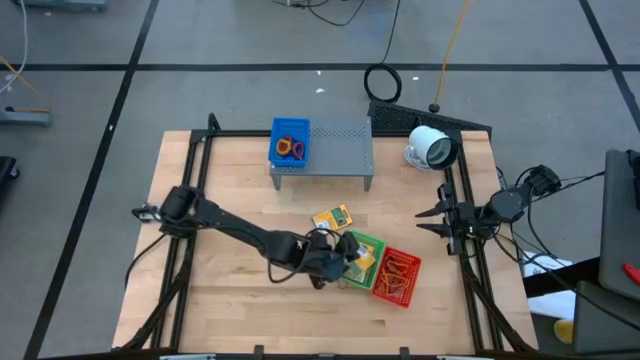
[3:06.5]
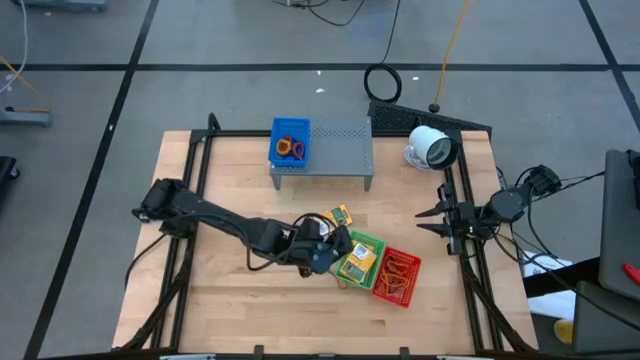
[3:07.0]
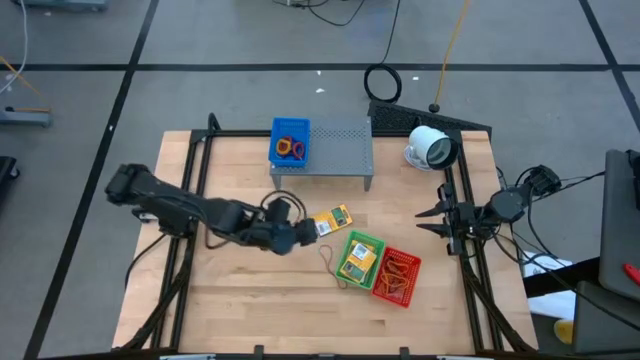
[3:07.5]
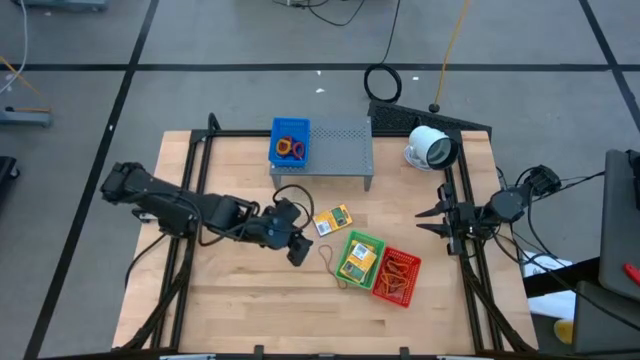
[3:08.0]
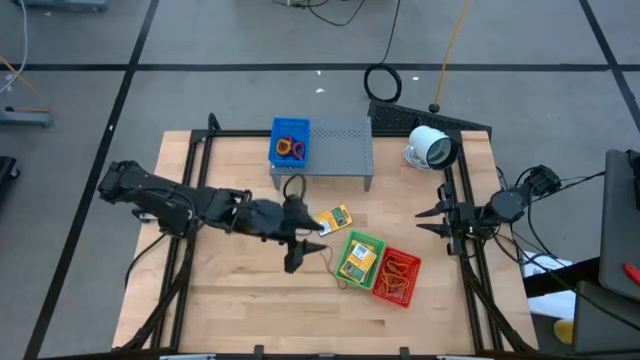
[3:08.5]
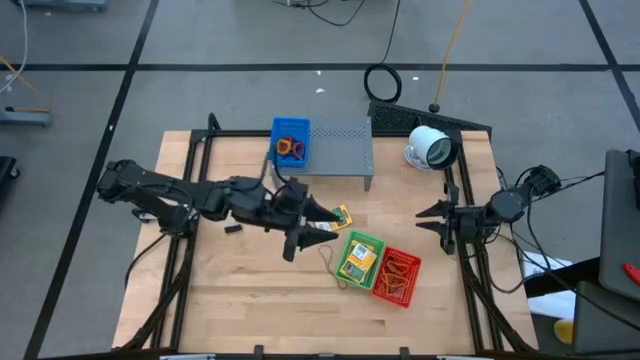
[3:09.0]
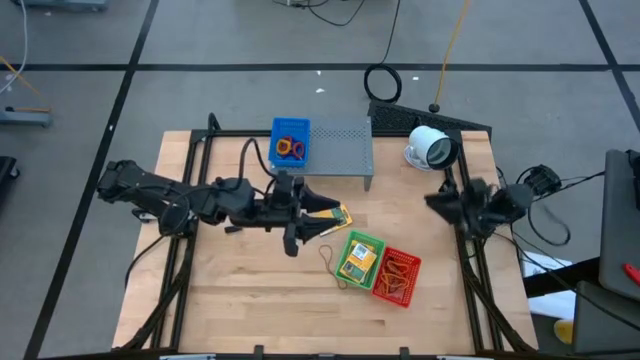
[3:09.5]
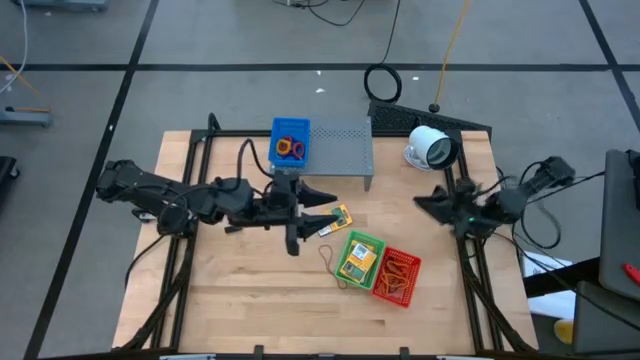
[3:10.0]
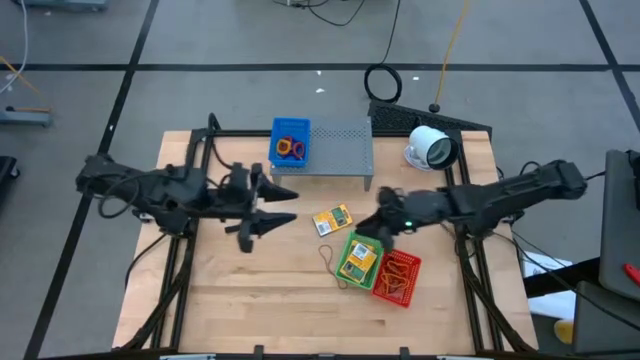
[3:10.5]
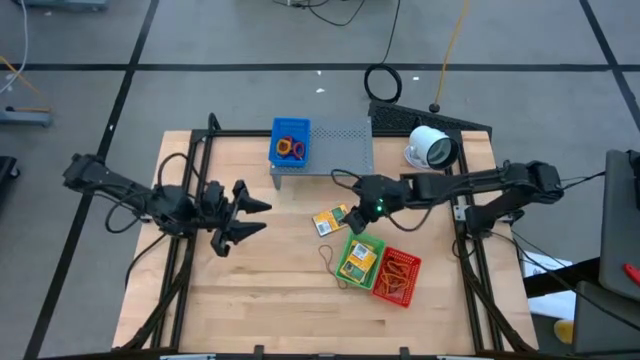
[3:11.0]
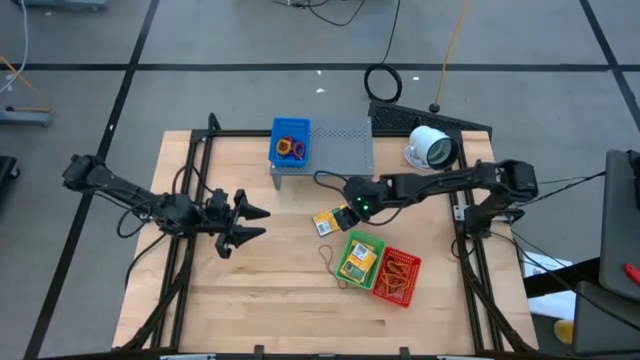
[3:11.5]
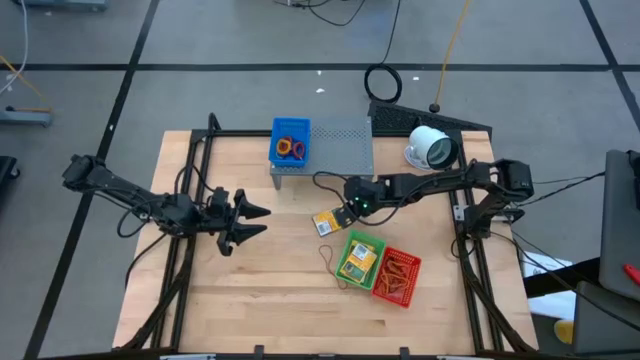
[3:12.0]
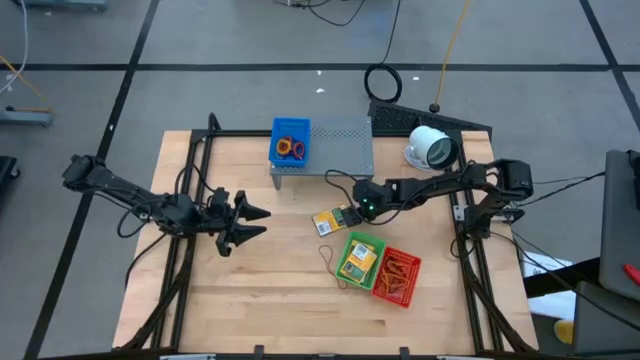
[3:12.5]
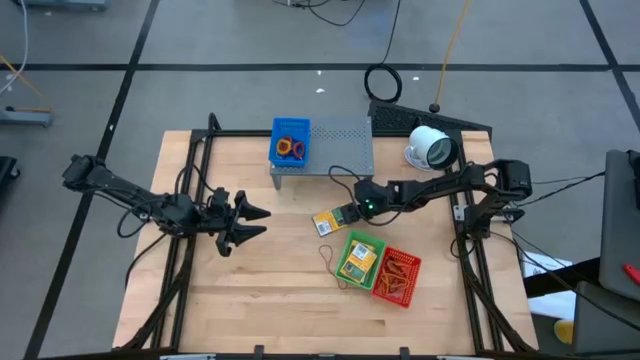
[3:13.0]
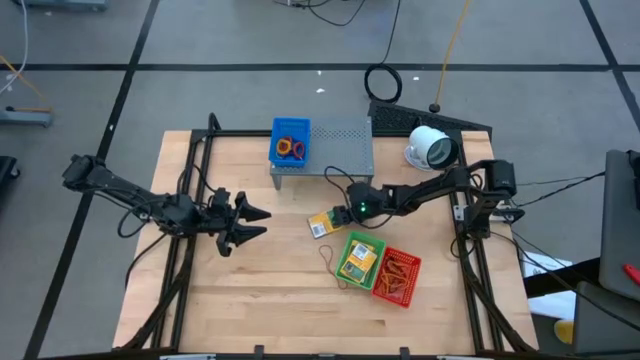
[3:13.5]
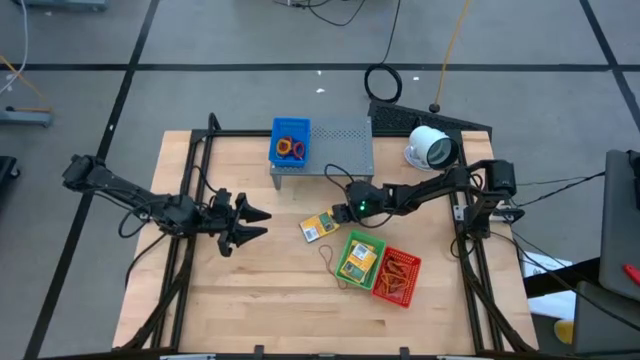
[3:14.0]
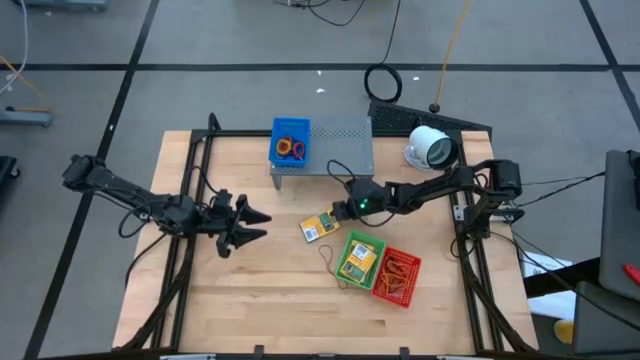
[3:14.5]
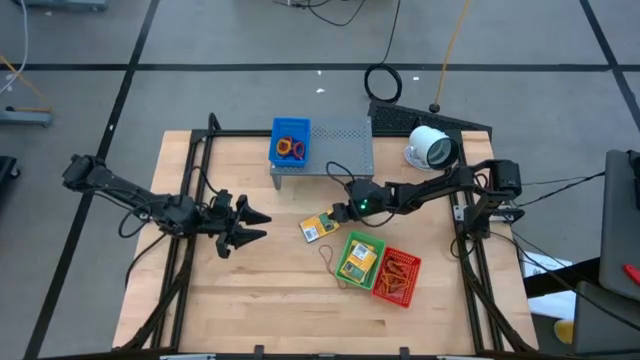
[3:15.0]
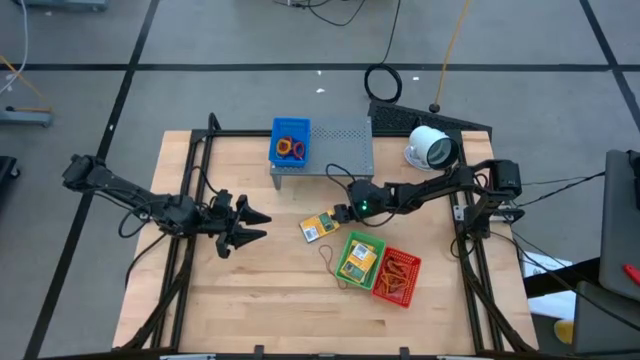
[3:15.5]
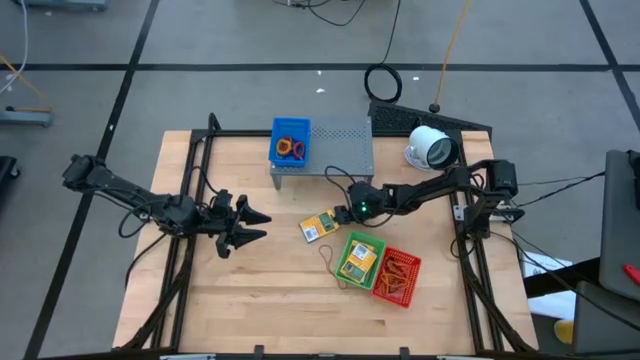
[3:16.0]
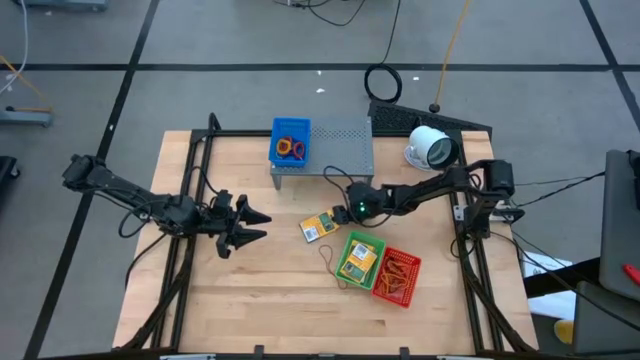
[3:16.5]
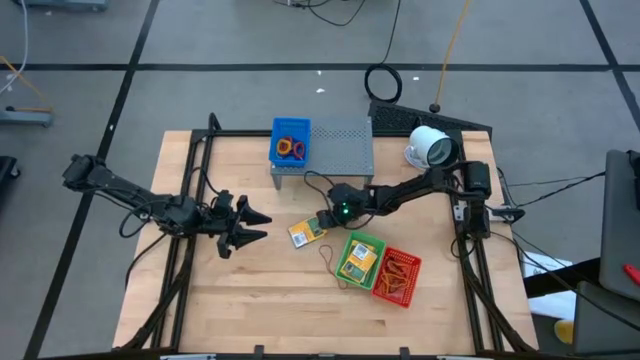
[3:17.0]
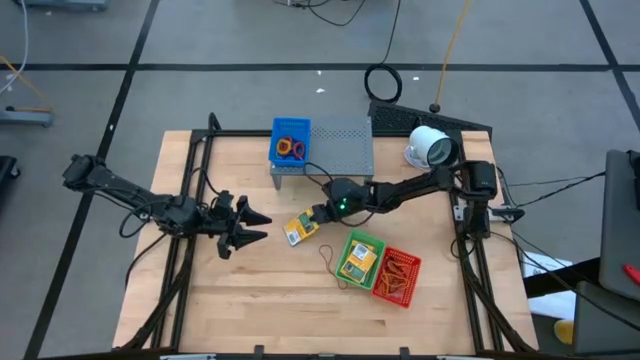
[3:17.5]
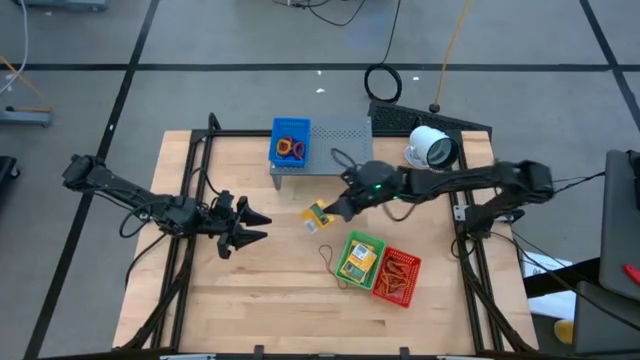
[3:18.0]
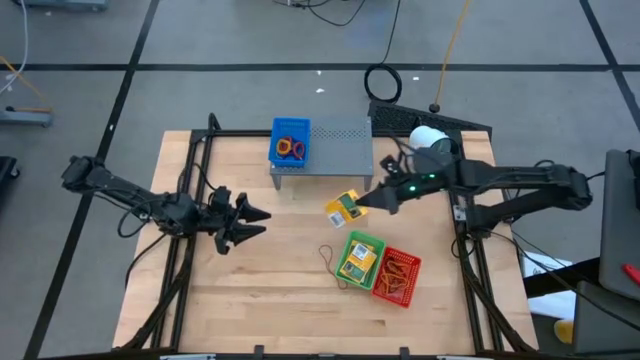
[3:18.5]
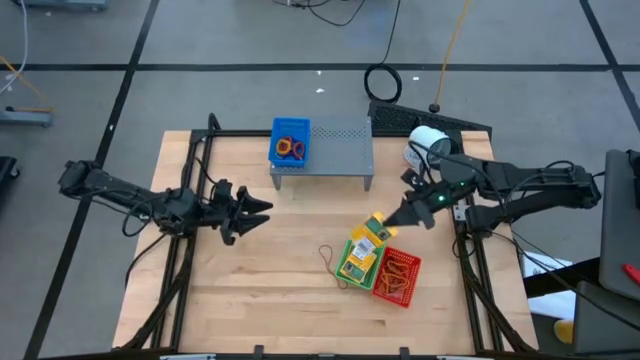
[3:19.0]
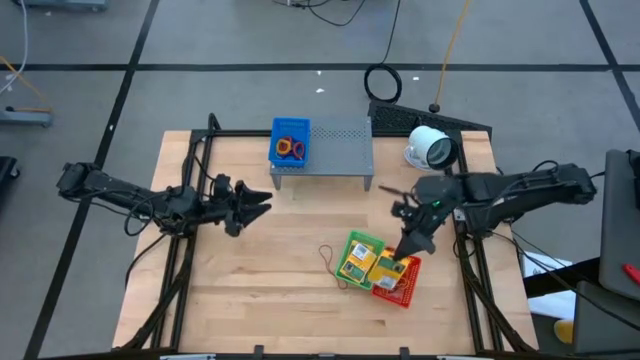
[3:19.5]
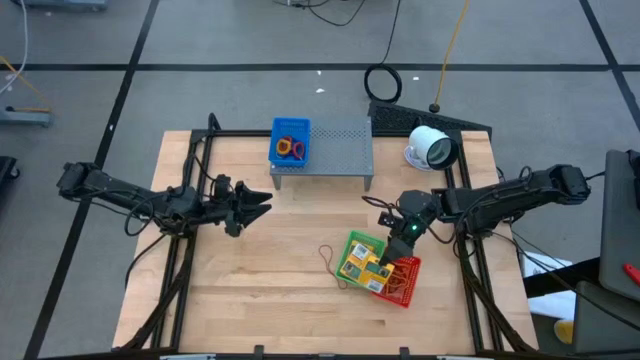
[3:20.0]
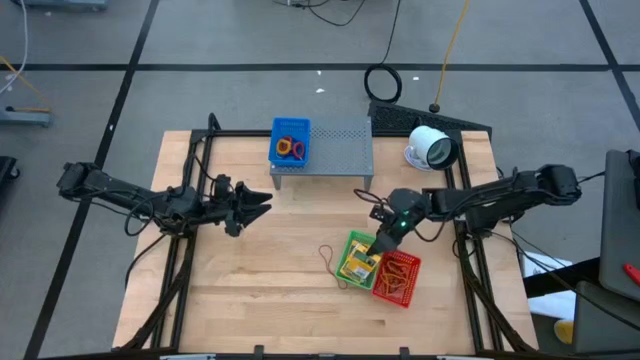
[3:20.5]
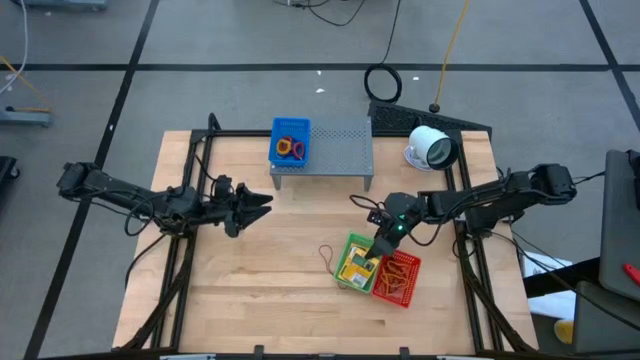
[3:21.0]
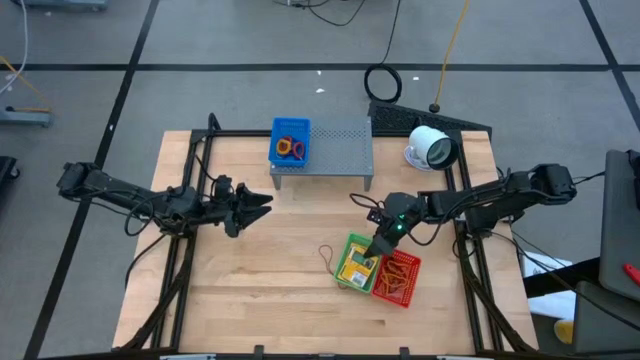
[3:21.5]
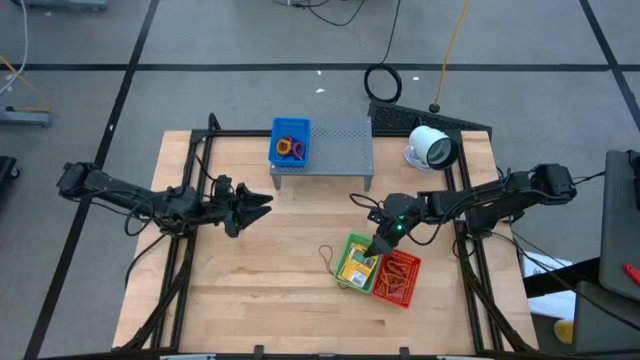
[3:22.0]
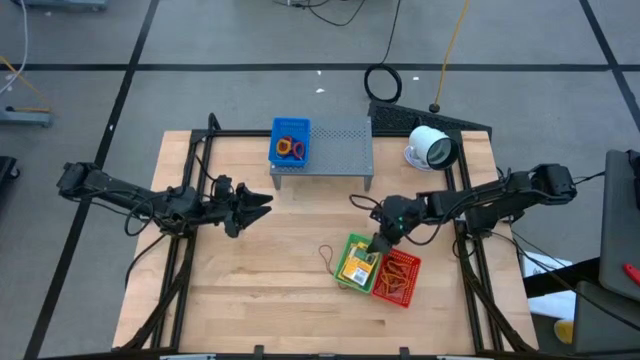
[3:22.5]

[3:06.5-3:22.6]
Task: Pick & Place Office Desk Supplies
Put the crayon box into the green bin

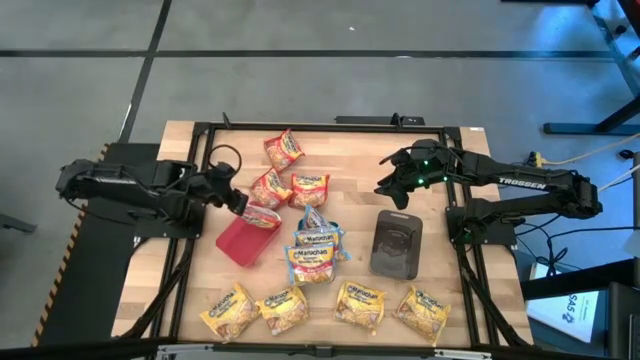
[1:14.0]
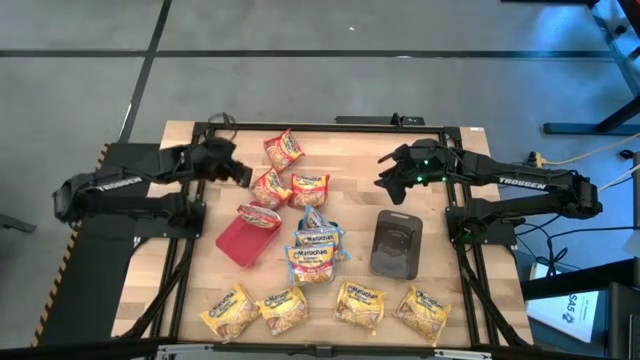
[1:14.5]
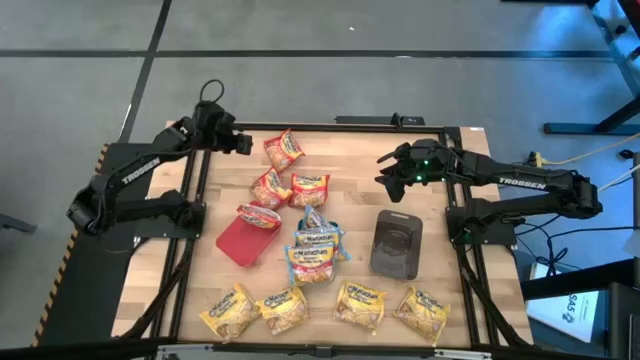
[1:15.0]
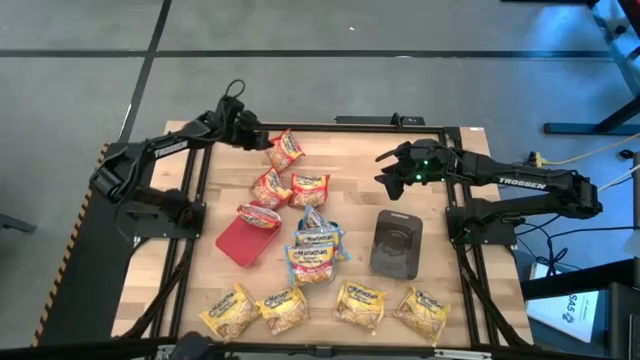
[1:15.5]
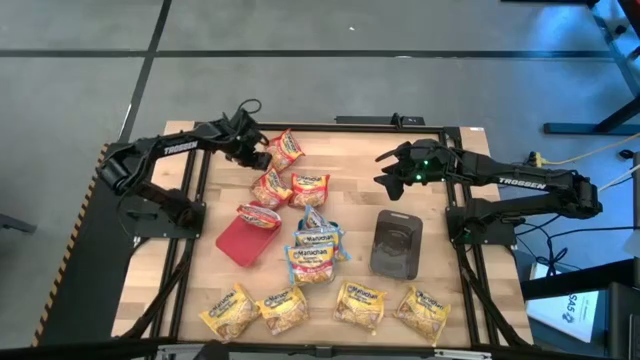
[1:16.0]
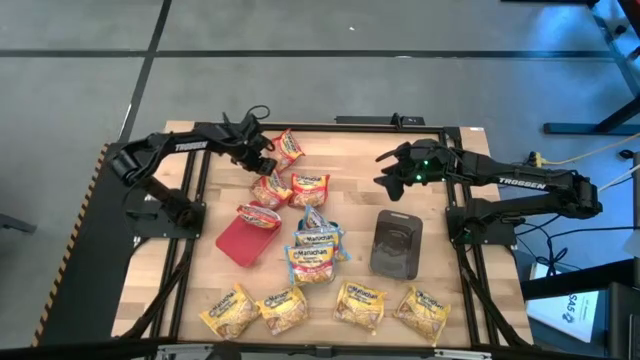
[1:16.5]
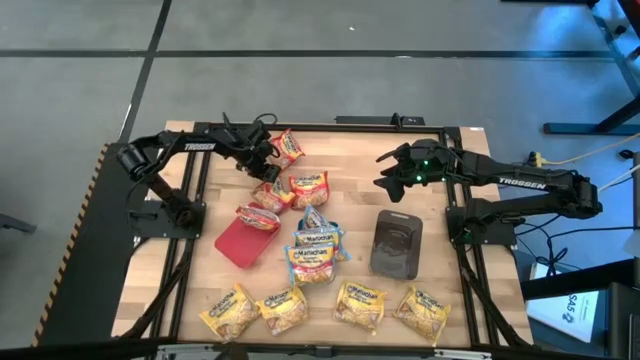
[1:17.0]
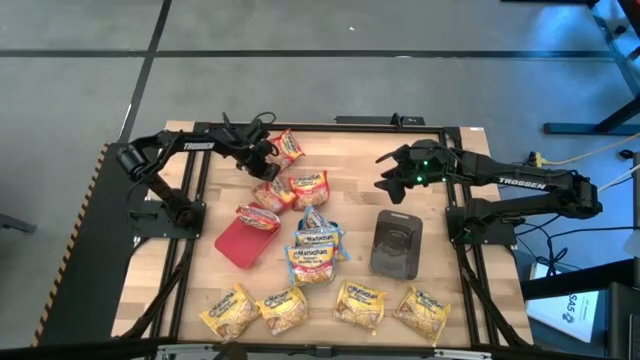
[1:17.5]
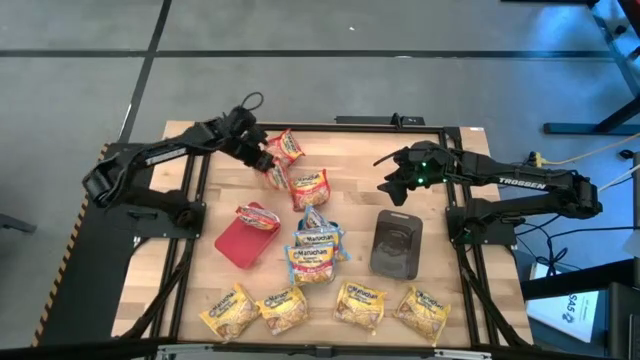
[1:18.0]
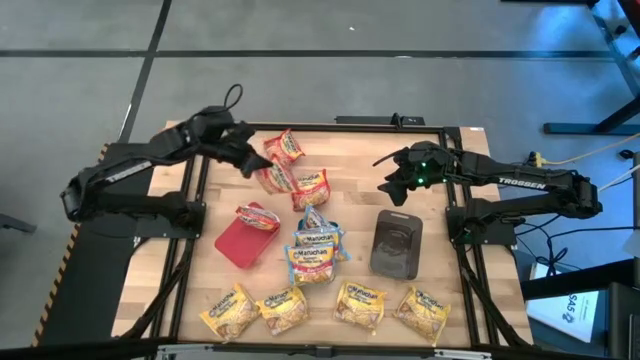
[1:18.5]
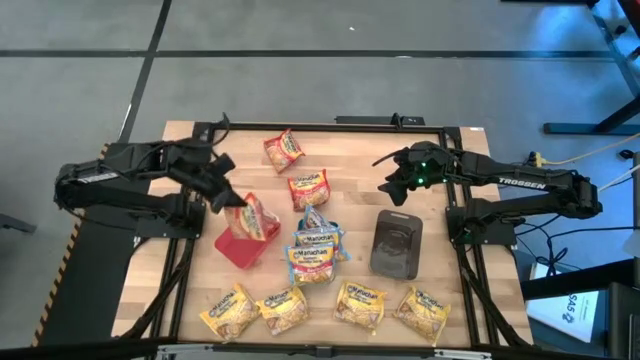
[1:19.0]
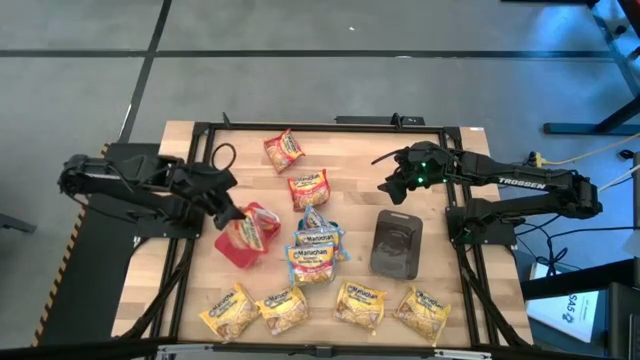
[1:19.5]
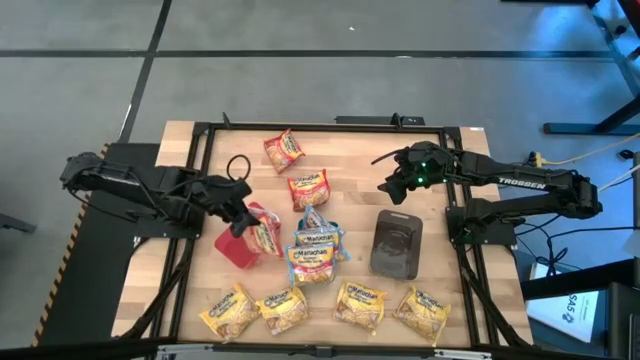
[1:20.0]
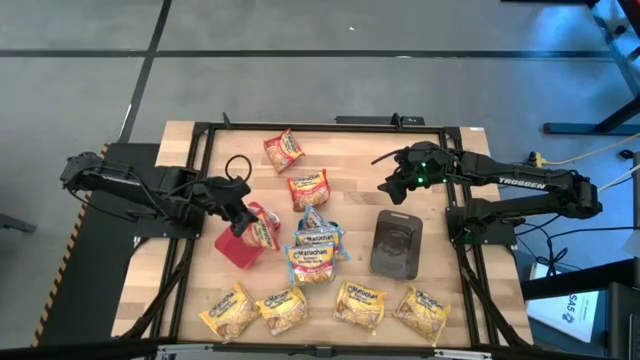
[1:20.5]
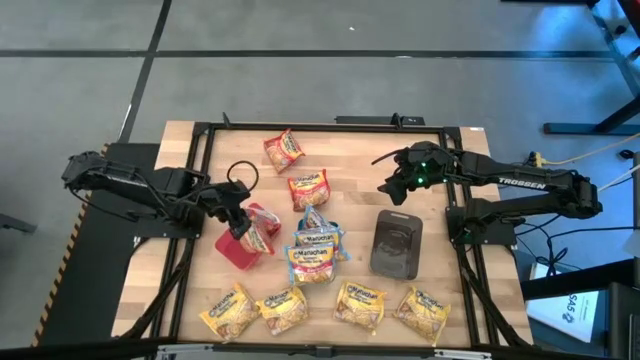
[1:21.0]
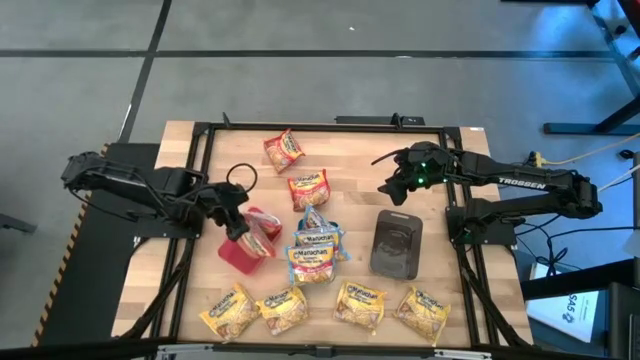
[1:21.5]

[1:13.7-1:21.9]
Task: Sort Maruchan noodles
Put the red noodle pack into the red bin
